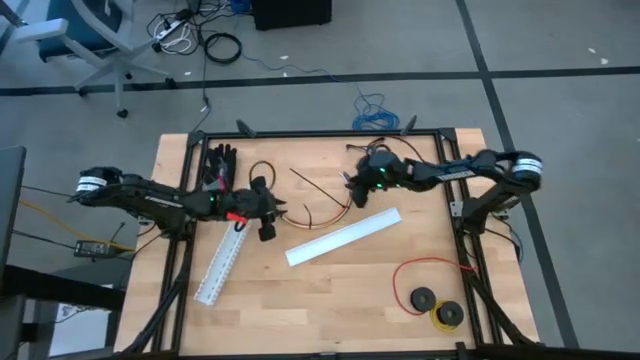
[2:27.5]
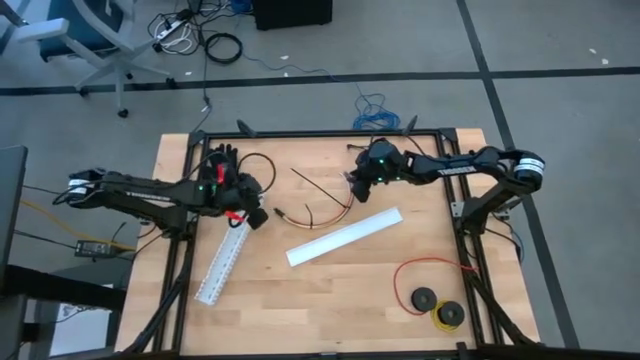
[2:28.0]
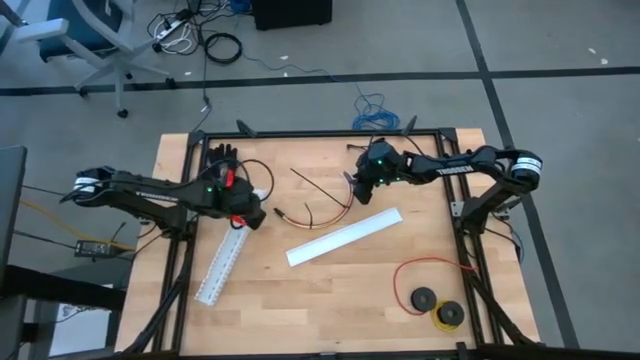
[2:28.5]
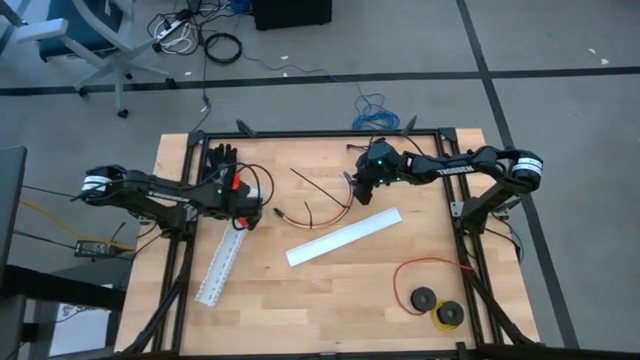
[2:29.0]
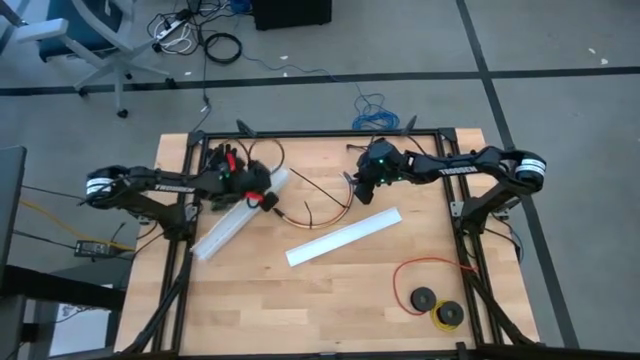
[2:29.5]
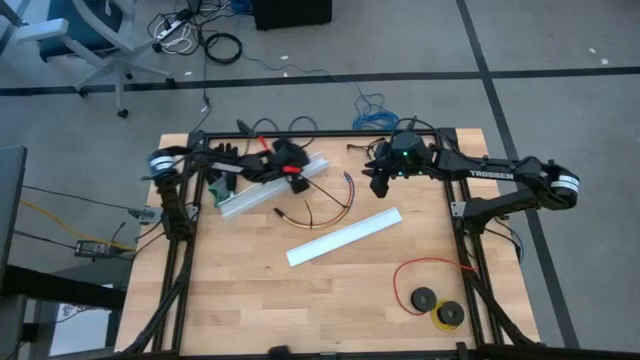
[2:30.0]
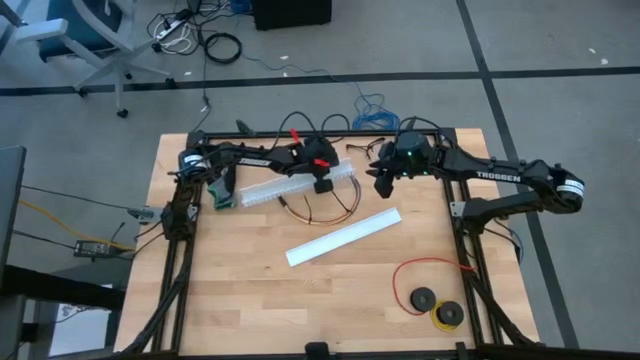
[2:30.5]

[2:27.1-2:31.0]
Task: Ziptie cables
Move the white cable duct to the top center of the table

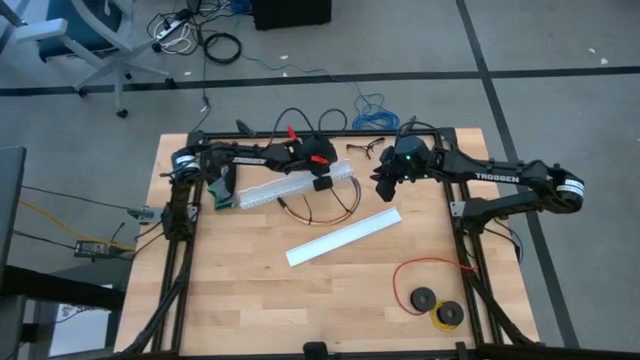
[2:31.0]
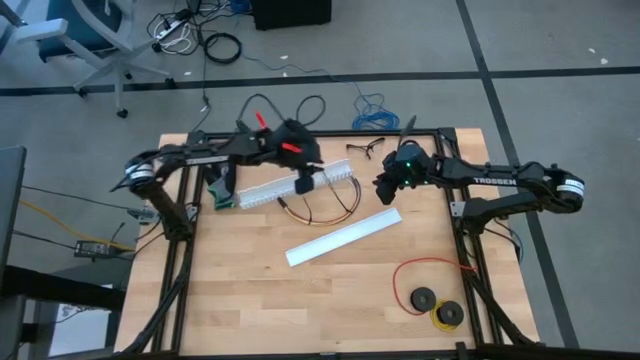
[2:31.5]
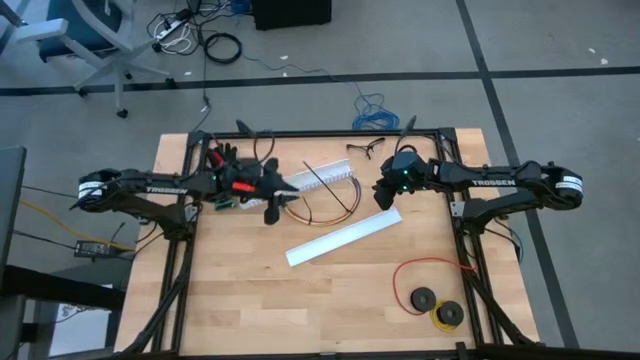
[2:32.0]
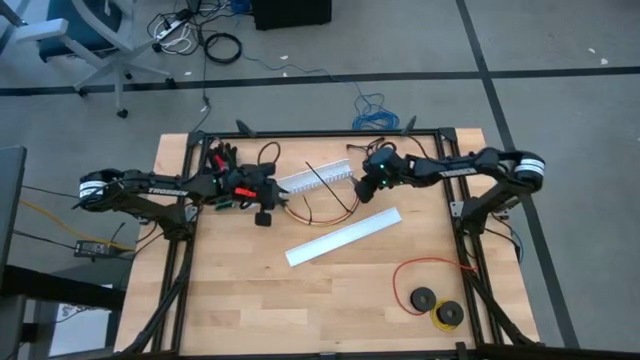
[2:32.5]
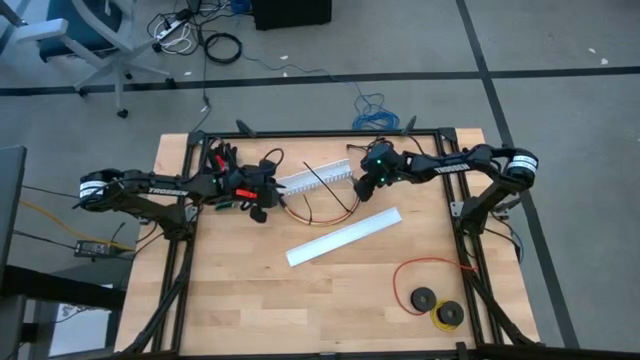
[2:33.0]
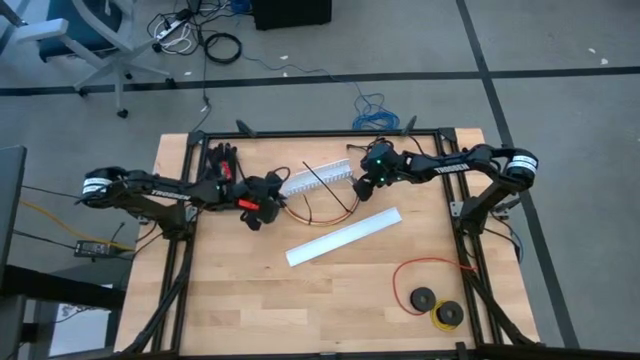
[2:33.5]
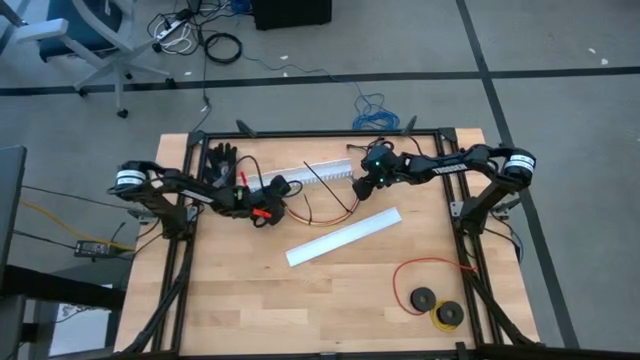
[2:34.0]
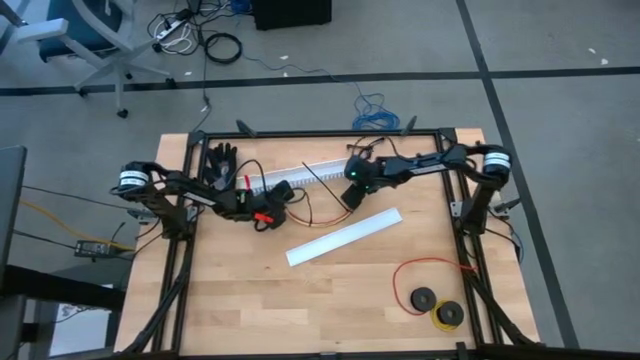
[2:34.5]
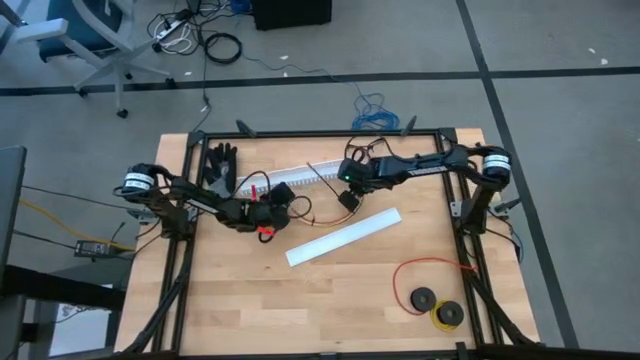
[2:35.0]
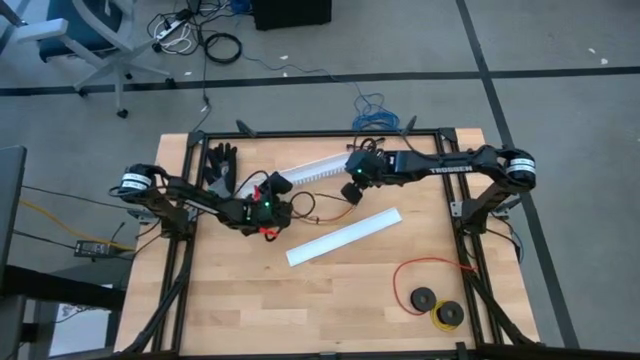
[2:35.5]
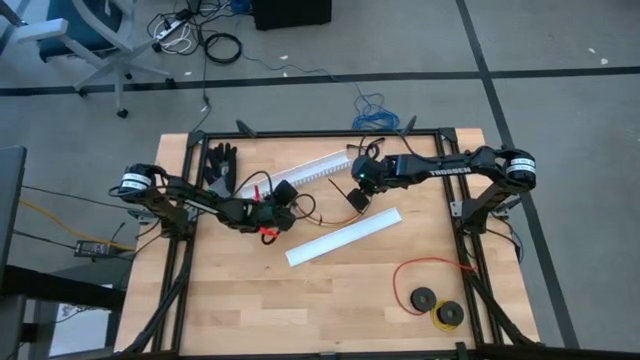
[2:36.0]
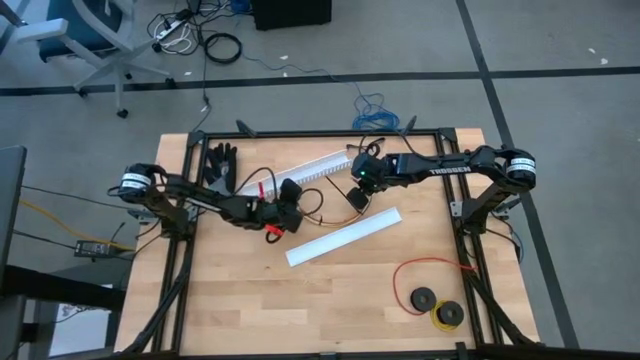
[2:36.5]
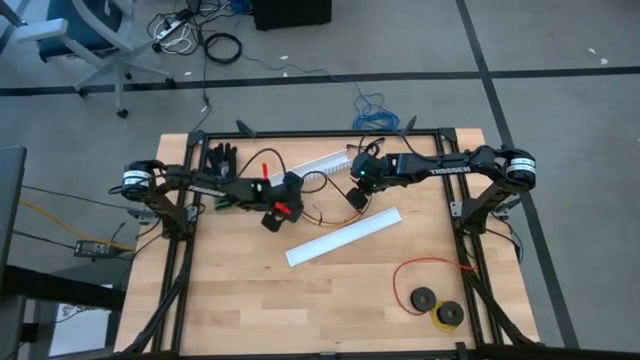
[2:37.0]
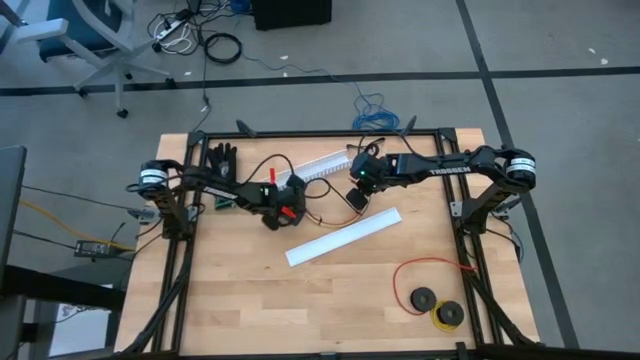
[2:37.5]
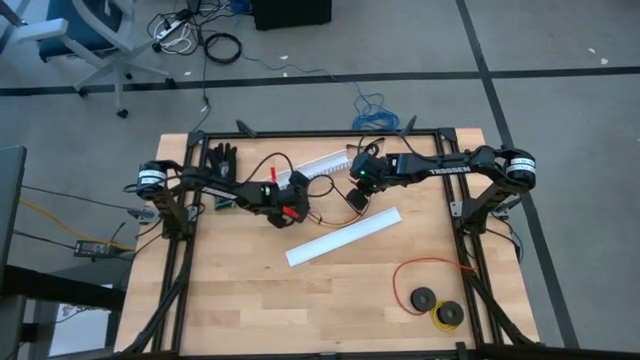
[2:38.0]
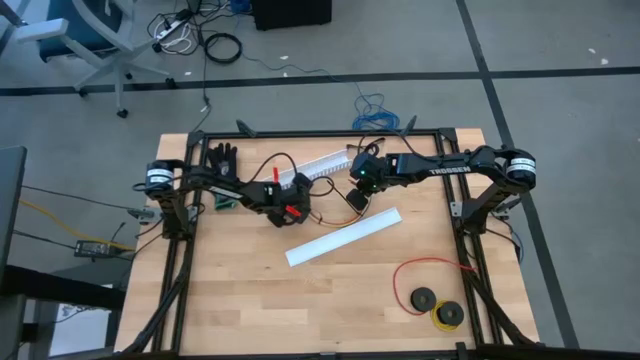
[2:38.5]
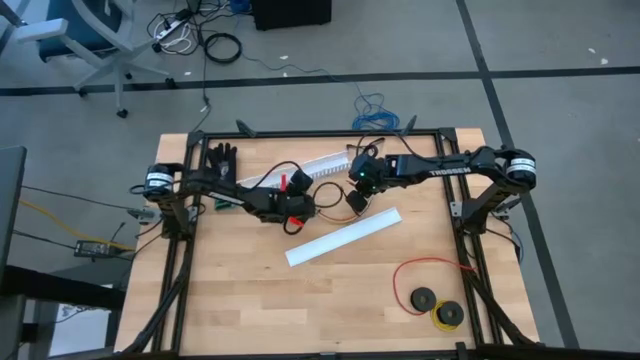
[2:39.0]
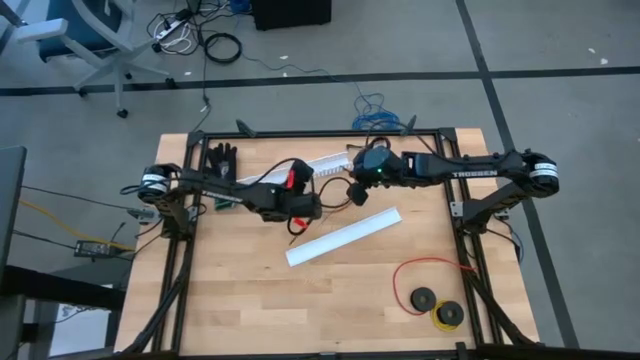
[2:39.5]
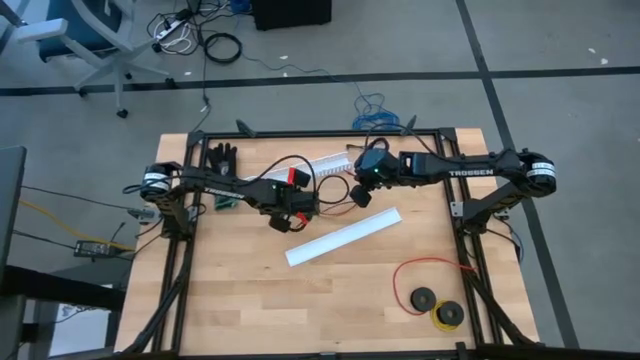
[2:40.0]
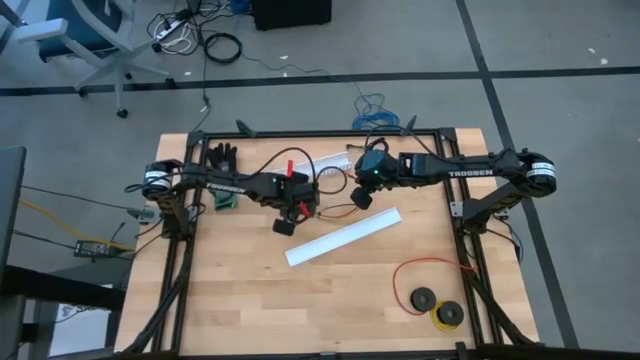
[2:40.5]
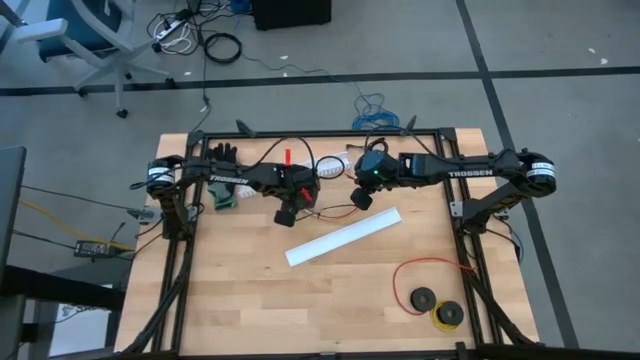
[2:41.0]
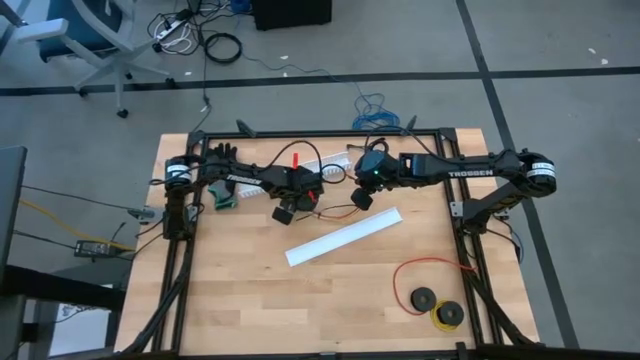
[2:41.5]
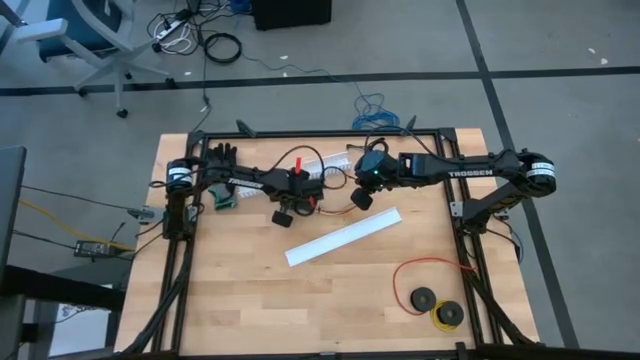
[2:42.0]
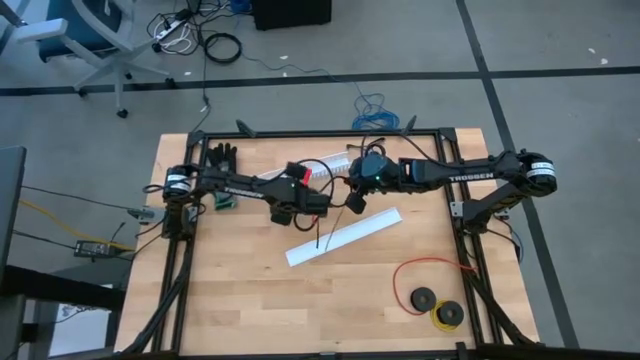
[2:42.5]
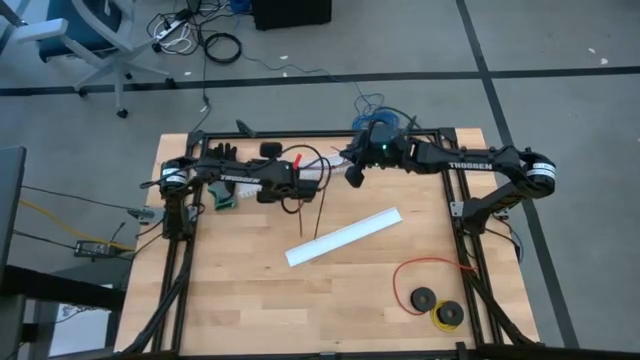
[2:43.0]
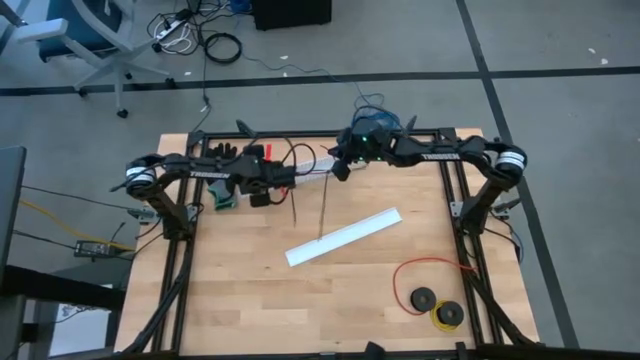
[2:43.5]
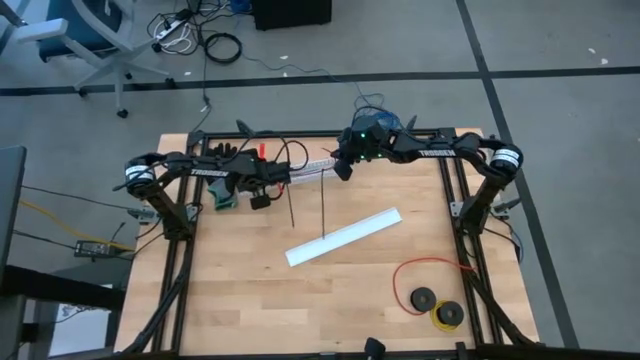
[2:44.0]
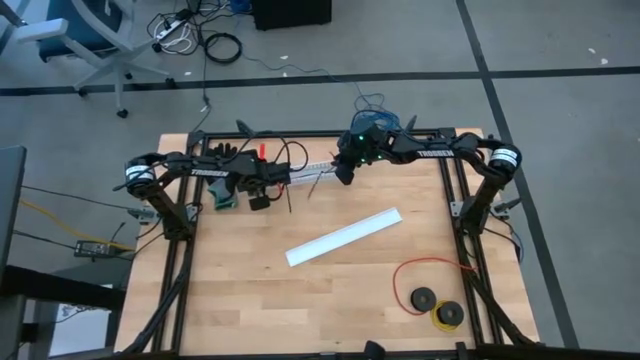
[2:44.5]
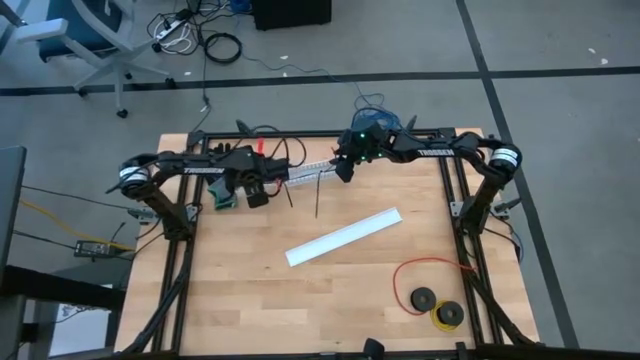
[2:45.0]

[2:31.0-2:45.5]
Put the zip-tied cables into the white cable duct

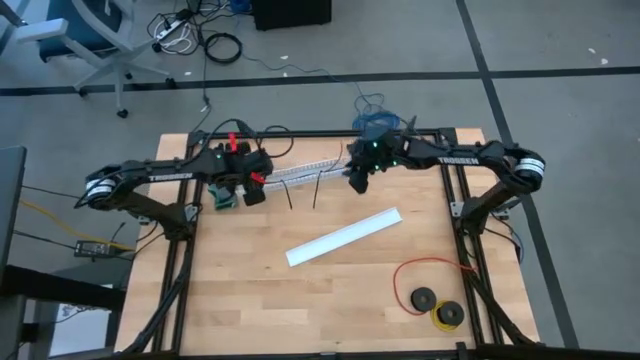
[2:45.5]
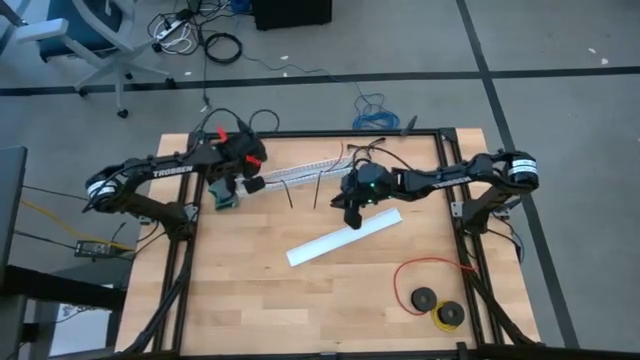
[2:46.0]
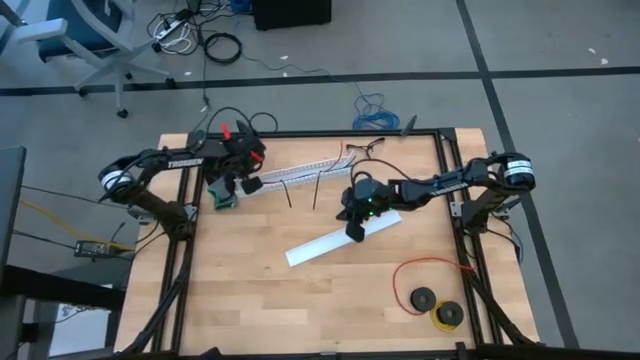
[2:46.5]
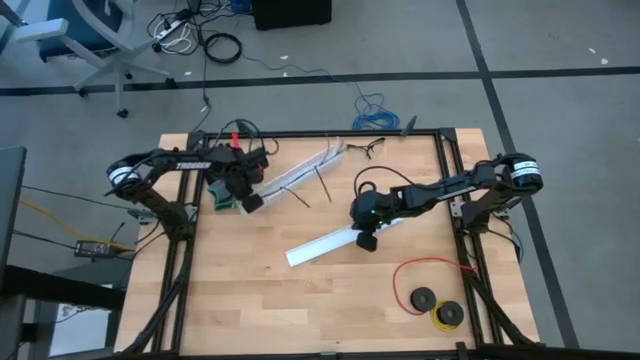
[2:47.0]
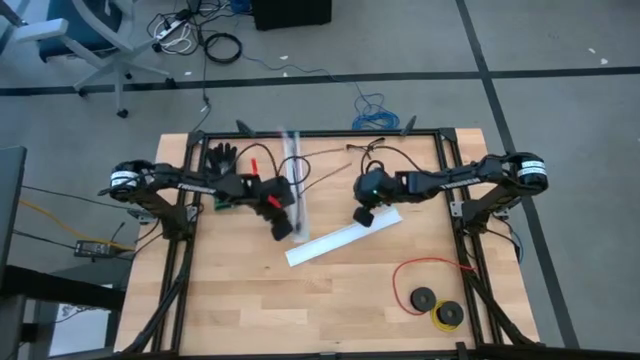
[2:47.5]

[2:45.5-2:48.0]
Adjust the white cable duct
